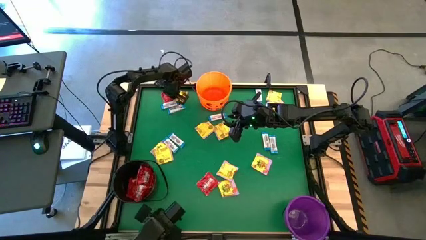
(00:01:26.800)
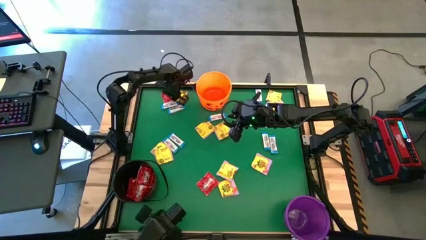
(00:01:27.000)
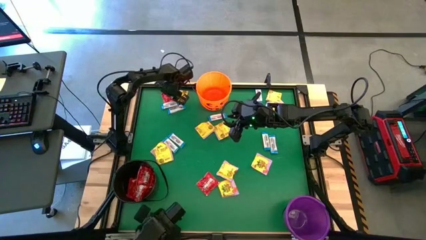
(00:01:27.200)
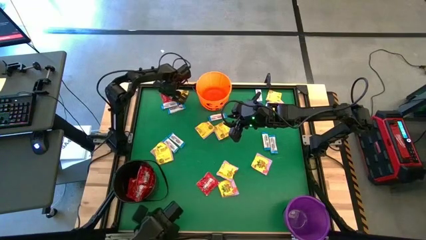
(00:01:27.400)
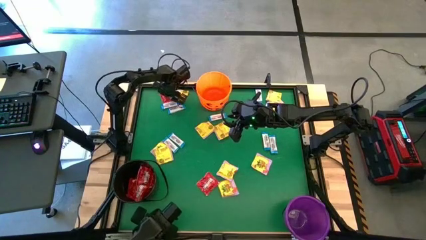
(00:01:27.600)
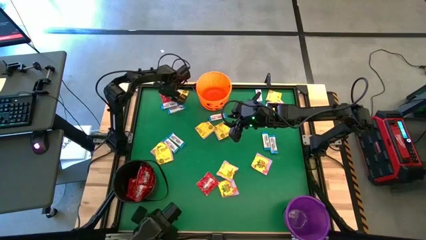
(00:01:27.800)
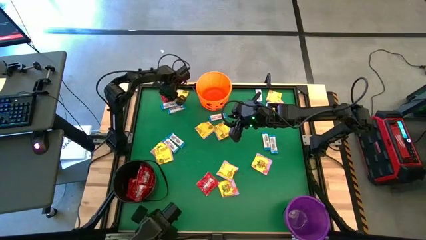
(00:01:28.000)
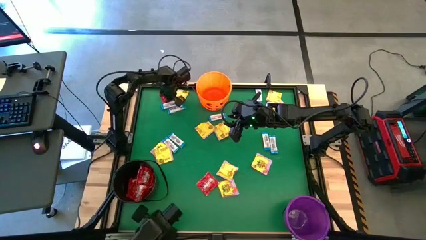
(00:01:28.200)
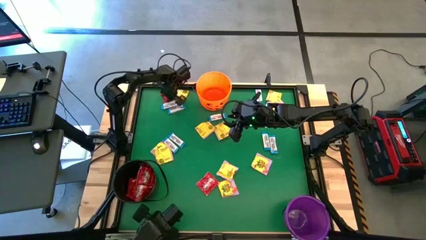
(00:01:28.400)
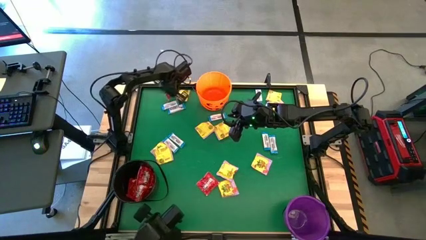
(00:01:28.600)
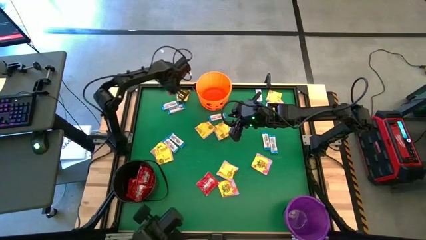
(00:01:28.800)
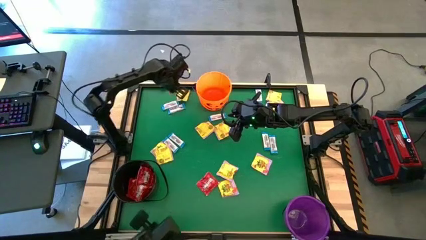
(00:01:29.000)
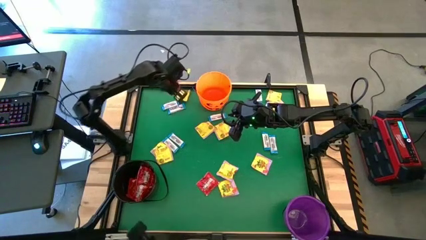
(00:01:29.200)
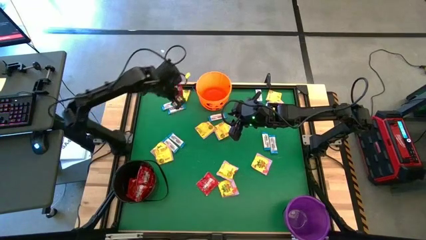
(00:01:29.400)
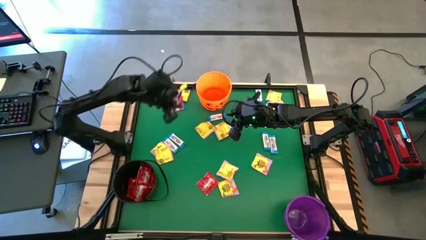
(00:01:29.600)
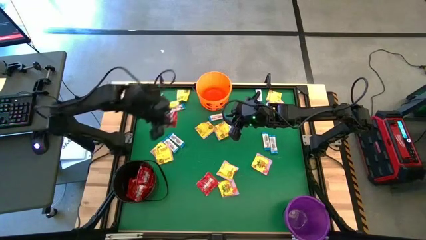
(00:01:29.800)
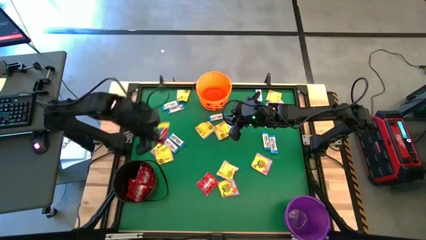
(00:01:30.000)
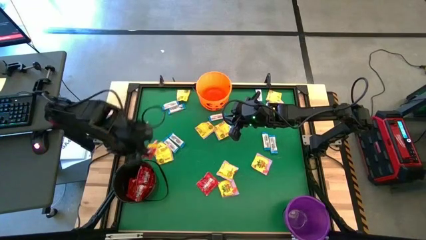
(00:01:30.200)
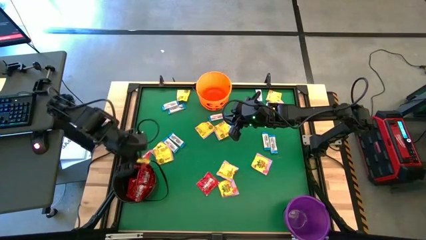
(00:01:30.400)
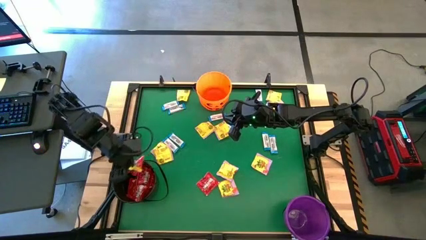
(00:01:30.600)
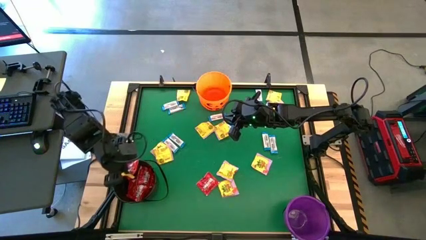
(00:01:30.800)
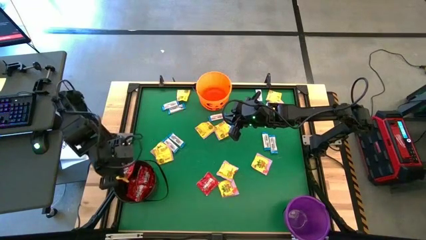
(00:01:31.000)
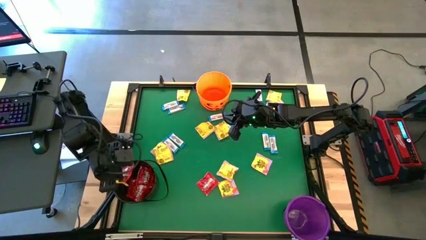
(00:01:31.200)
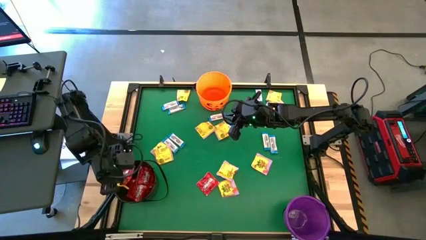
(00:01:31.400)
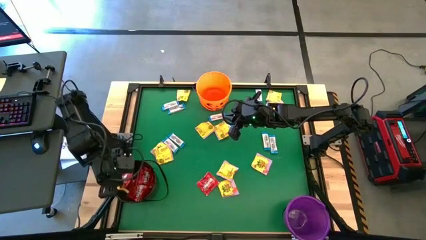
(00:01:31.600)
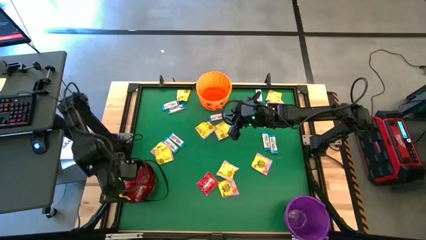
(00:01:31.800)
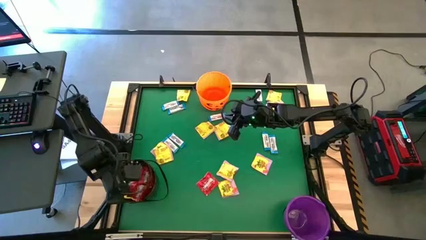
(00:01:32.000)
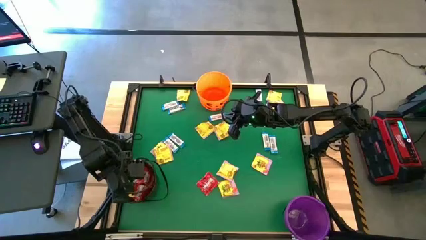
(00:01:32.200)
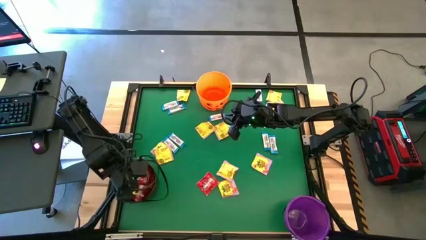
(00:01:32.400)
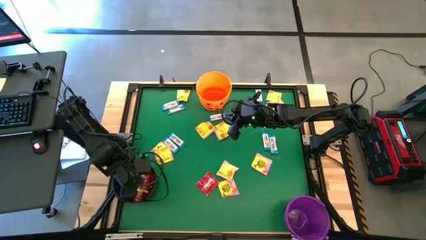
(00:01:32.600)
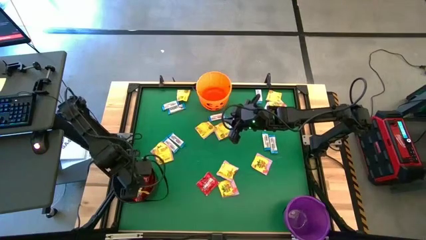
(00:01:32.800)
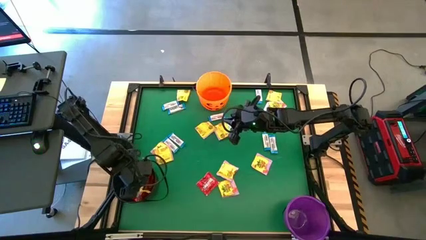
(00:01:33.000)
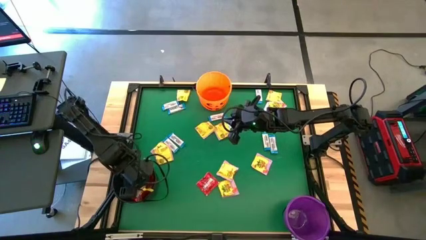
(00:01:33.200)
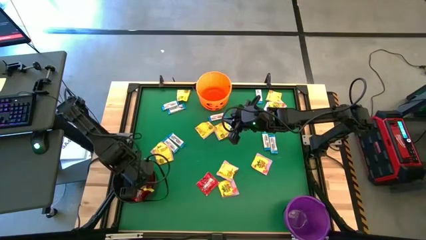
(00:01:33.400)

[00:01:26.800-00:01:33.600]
Task: Sort candy by brand, put in halloween buckets
Put the red candy into the black bucket

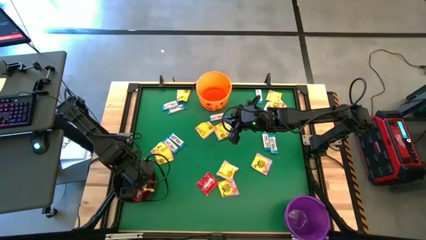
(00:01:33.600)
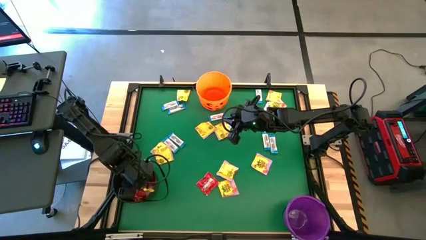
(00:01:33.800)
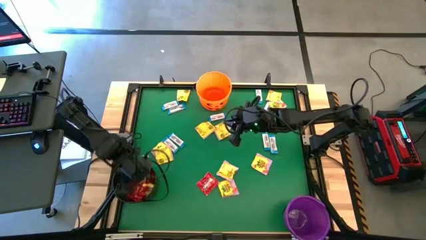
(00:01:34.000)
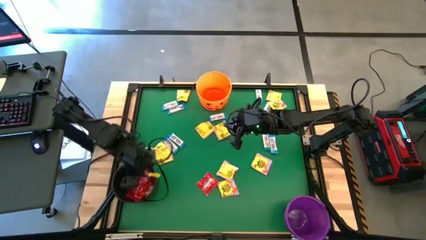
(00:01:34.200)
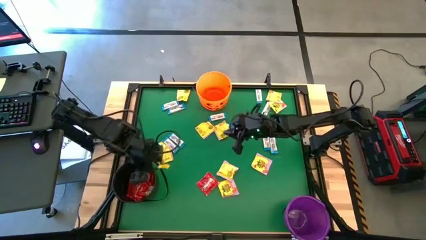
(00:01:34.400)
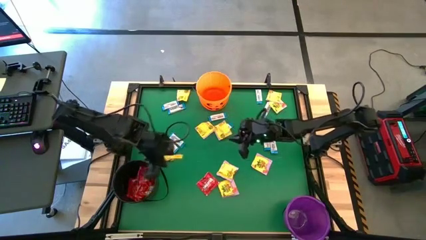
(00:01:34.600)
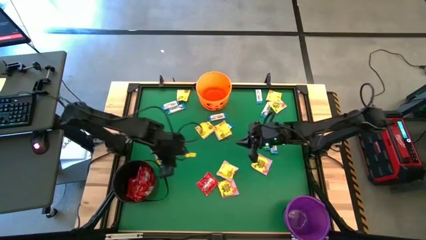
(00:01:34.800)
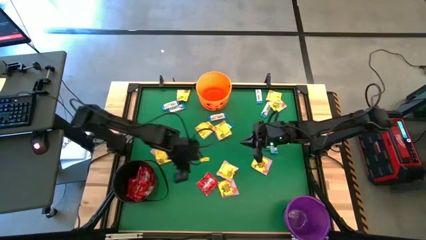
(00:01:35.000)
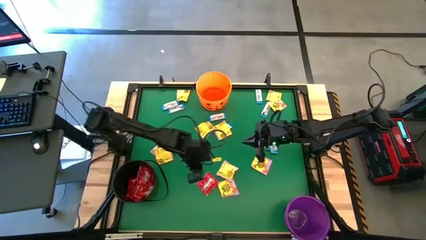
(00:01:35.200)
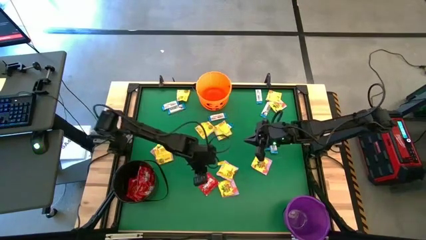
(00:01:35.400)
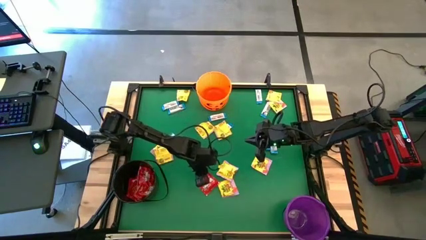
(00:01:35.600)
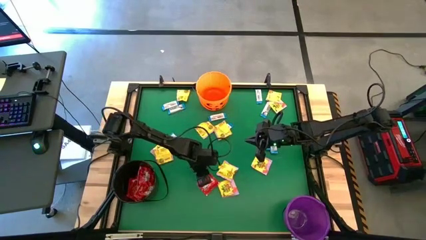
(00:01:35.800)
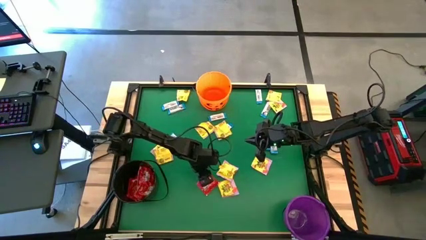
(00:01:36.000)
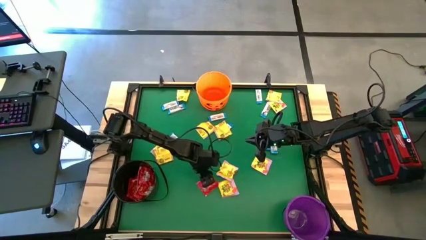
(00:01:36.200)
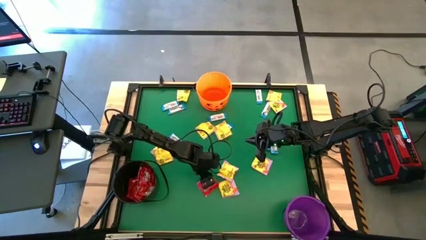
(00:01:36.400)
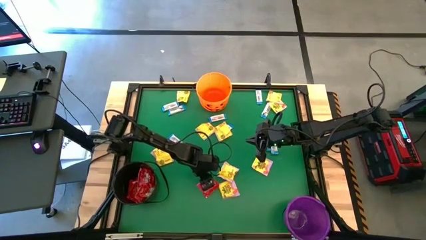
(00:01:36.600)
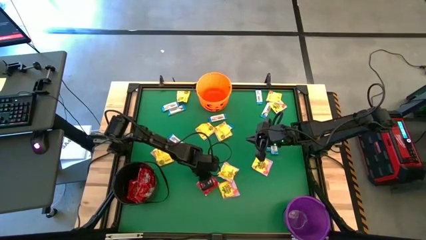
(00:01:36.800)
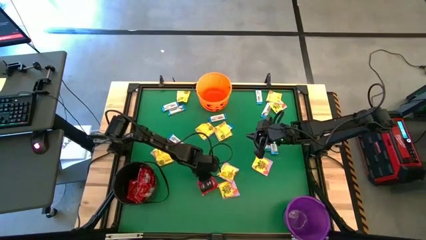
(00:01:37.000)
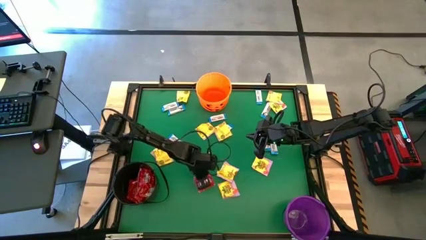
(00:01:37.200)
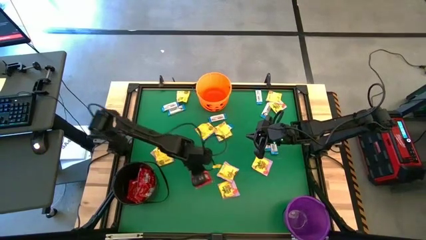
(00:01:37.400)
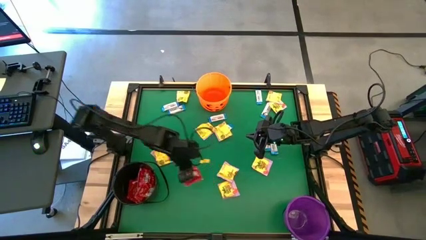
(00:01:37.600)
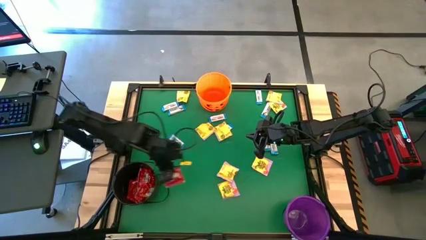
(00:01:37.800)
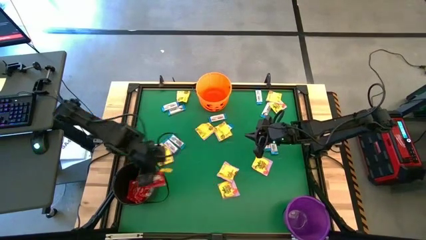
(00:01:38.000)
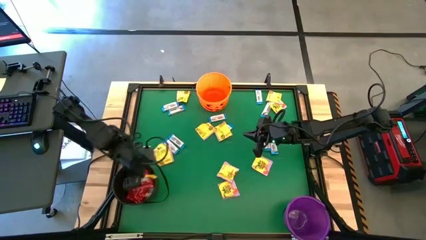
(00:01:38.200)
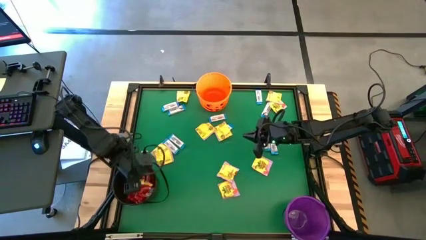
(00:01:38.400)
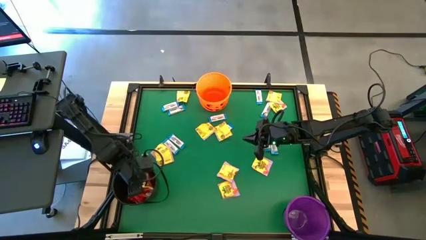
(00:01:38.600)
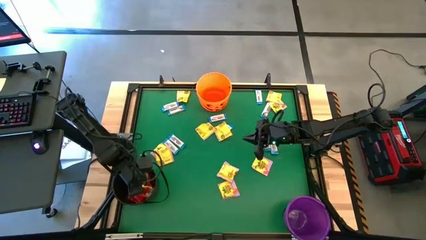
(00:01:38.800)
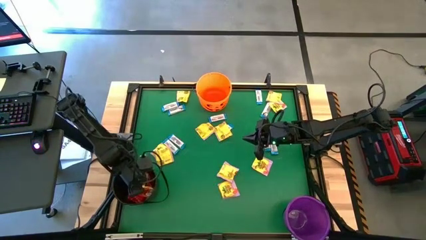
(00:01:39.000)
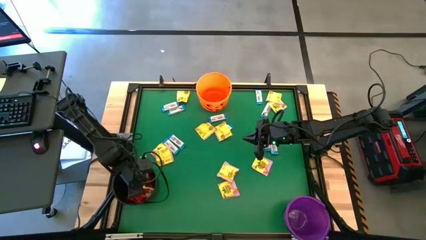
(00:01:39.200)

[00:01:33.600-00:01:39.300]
Put the red candy into the black bucket

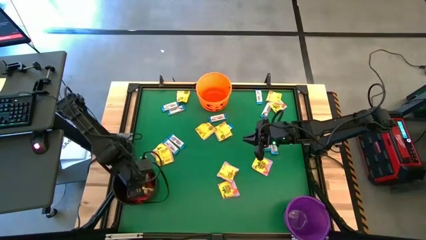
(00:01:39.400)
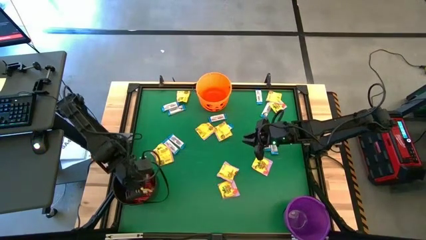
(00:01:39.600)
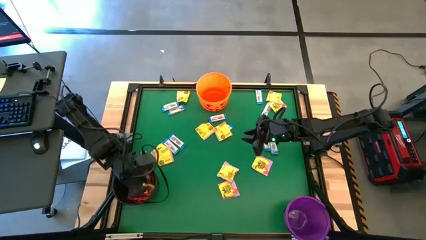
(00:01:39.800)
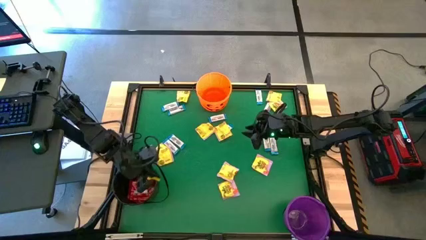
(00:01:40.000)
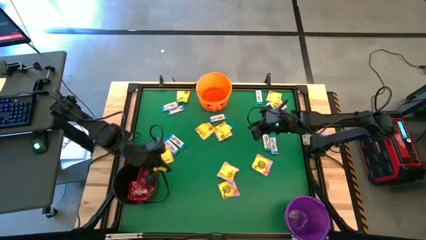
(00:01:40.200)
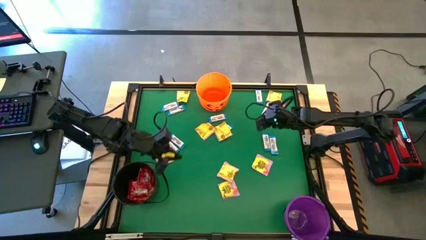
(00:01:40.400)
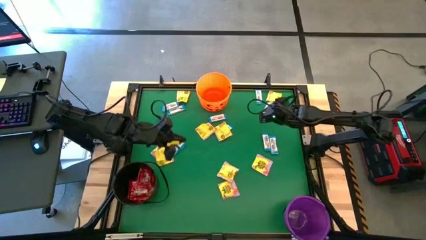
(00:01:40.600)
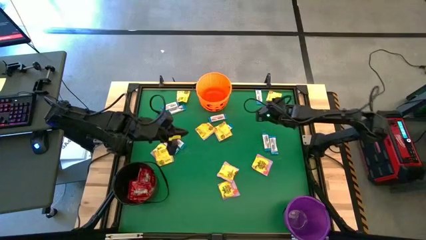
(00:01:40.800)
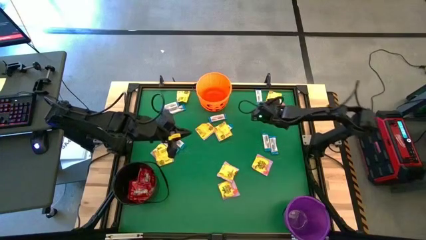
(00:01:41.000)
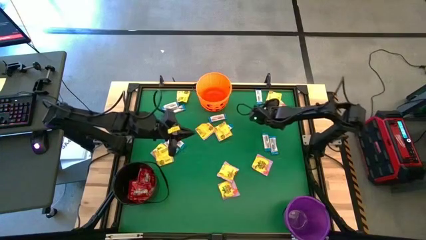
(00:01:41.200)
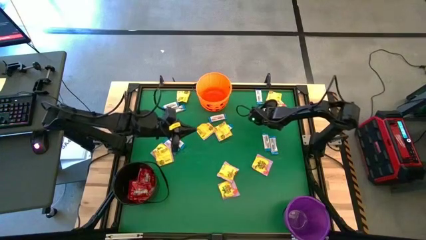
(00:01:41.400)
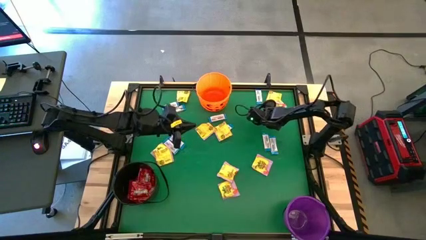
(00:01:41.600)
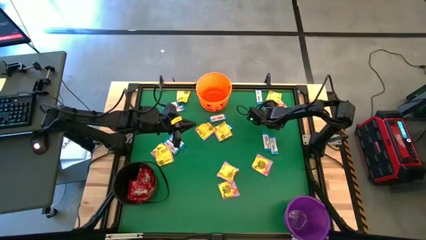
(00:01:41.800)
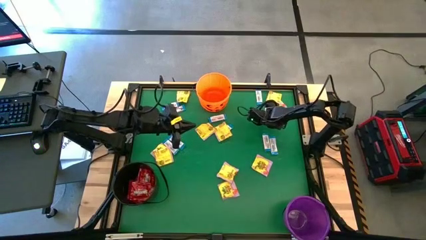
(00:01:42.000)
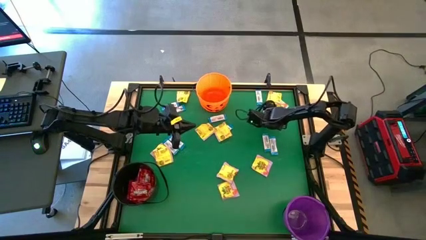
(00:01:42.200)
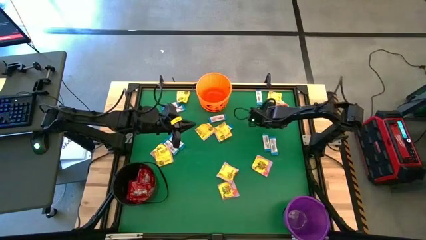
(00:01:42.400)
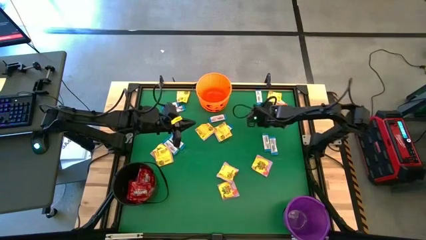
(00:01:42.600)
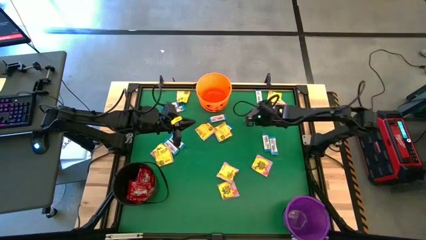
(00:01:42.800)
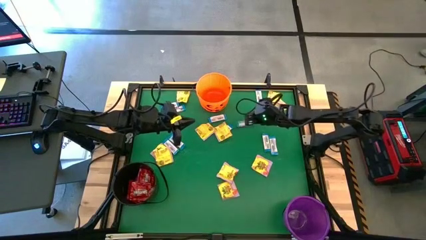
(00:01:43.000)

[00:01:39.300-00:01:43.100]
Put the white chocolate into the orange bucket
